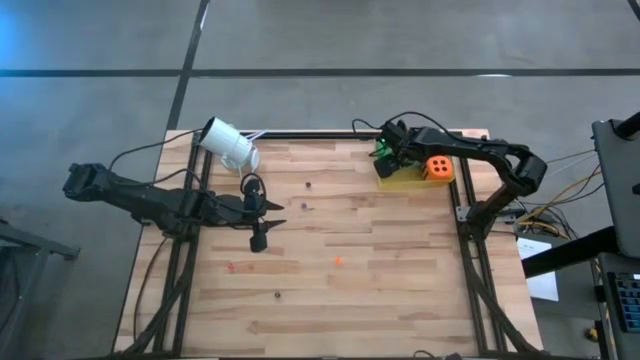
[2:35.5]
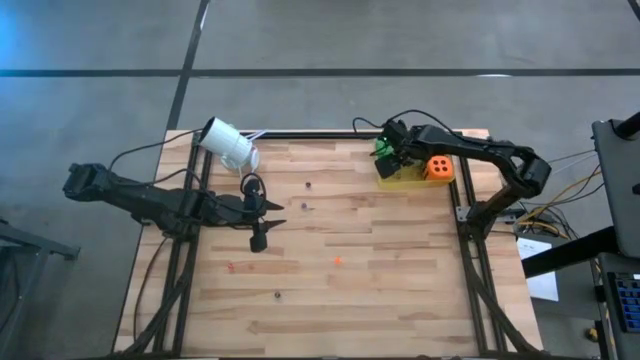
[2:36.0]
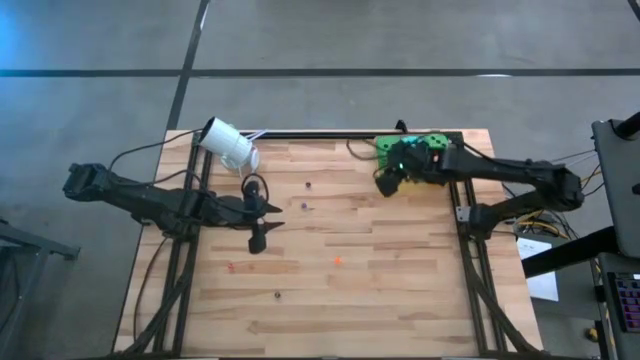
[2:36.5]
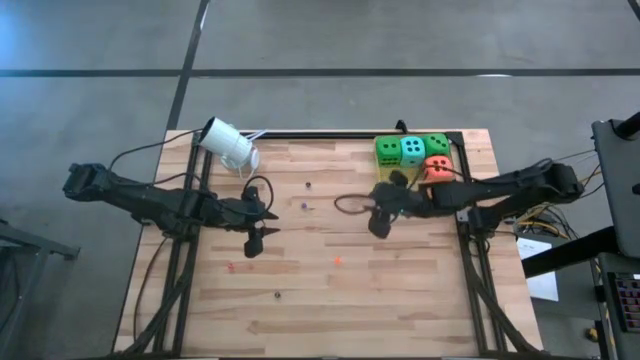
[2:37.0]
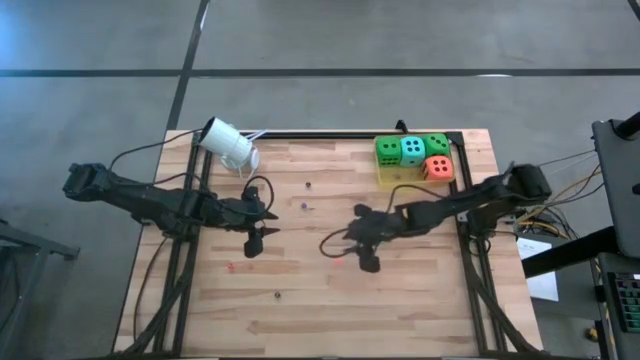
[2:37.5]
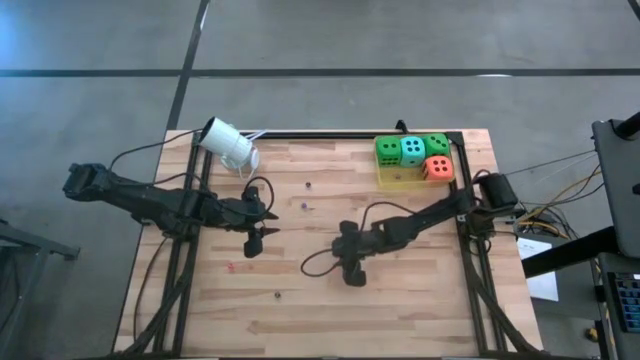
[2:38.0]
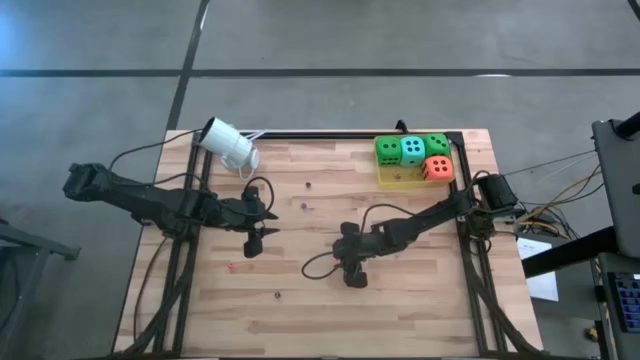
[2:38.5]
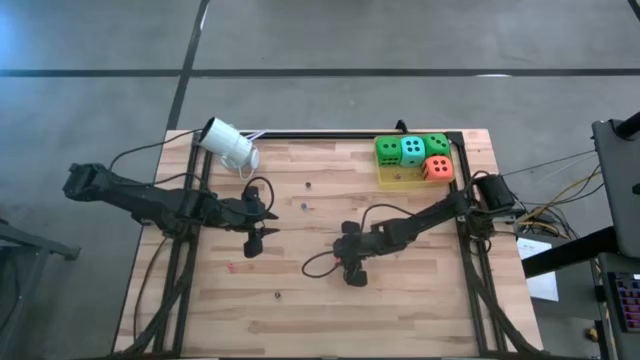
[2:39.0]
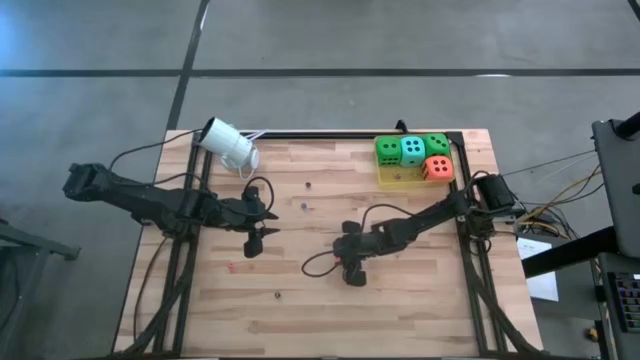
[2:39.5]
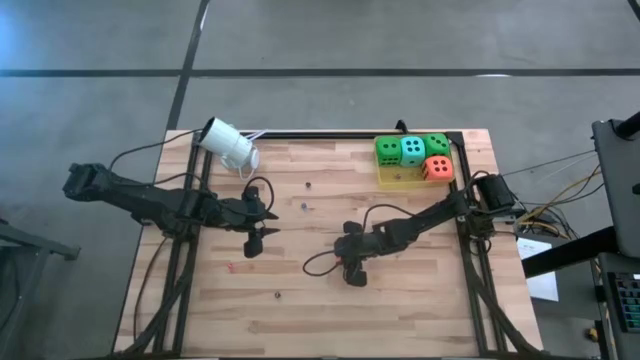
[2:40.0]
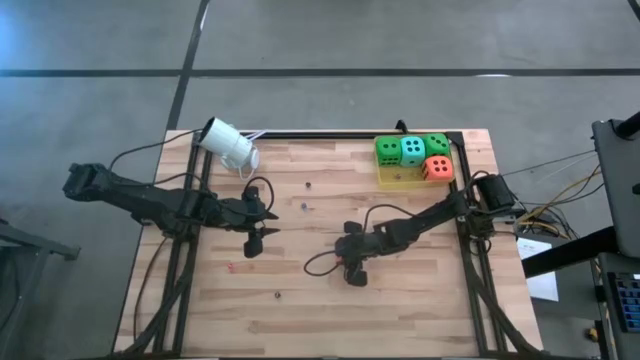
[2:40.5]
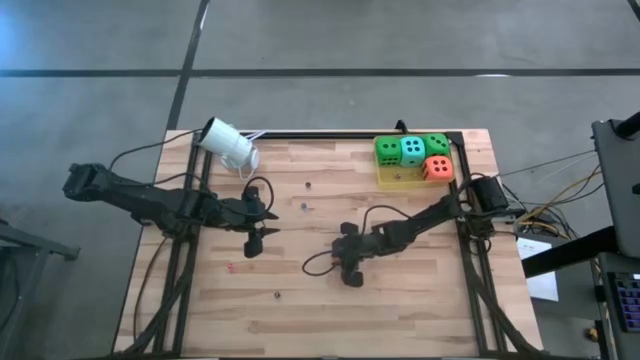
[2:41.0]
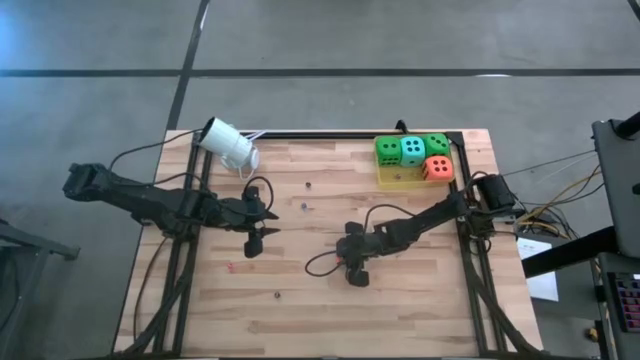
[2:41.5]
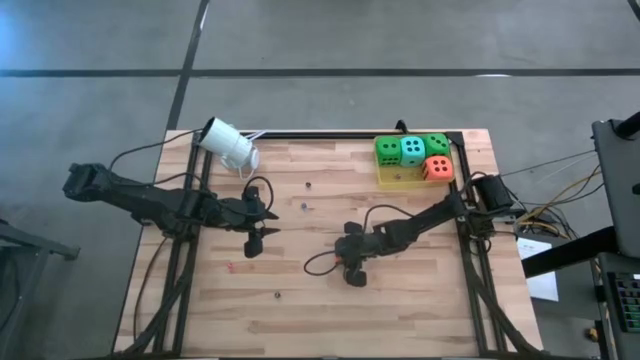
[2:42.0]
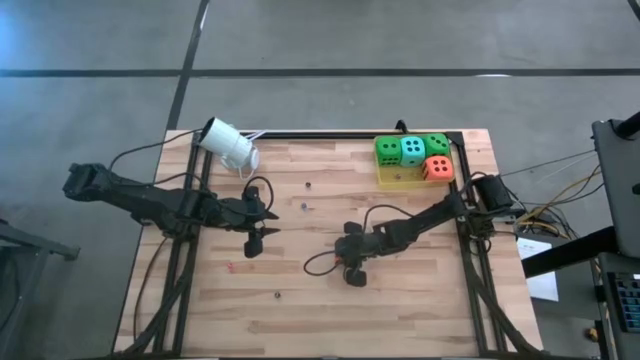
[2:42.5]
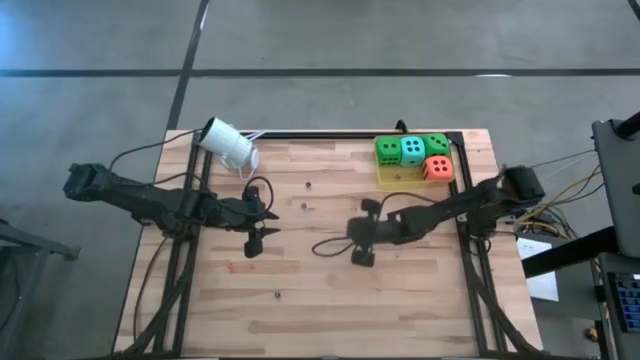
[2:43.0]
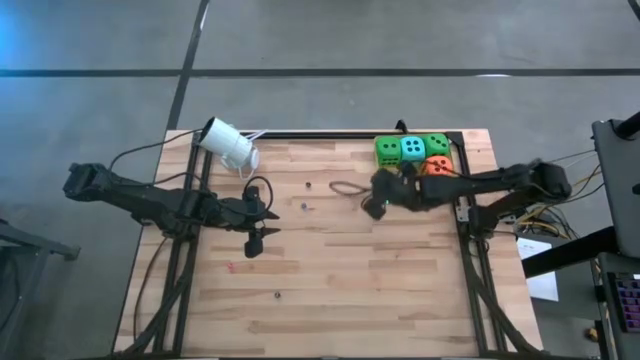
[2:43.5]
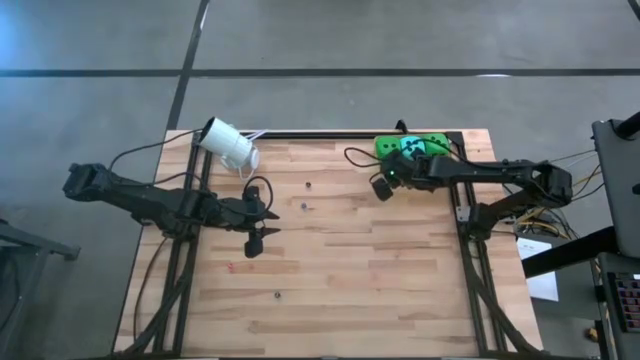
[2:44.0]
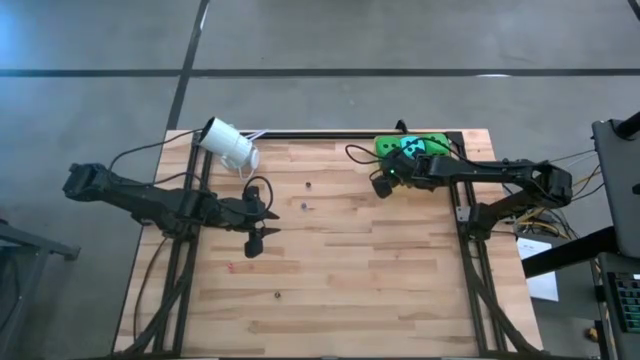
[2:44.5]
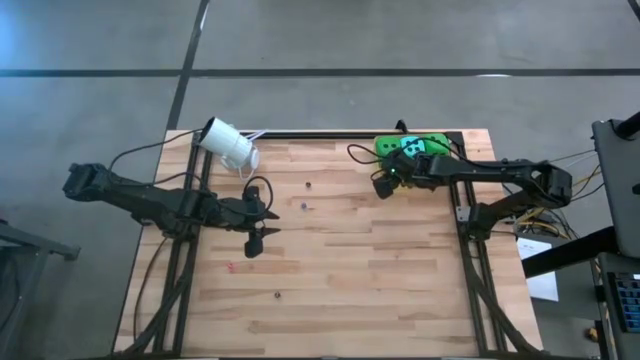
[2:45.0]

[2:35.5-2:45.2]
Task: Pick & Place Dice
Put the small orange dice into the yellow bin

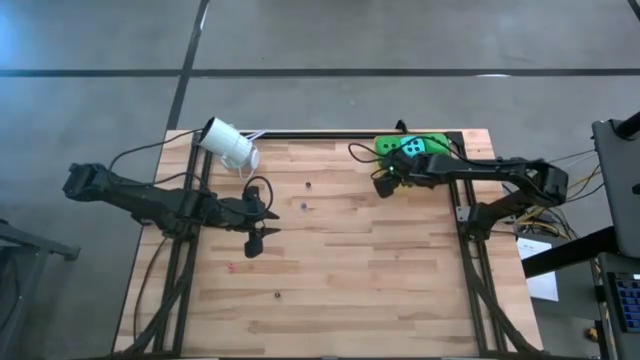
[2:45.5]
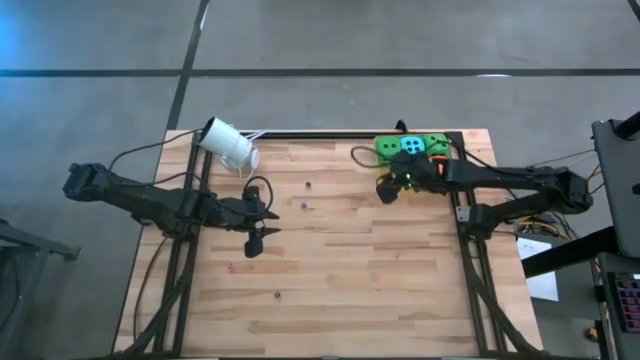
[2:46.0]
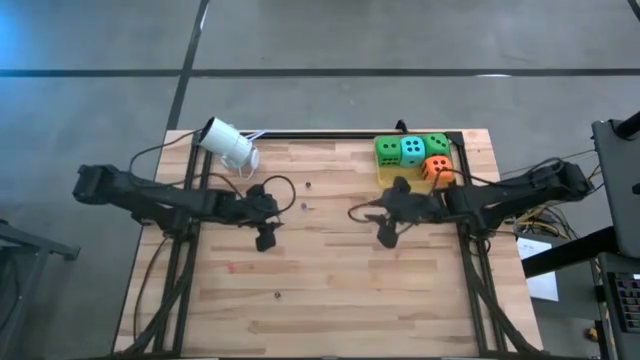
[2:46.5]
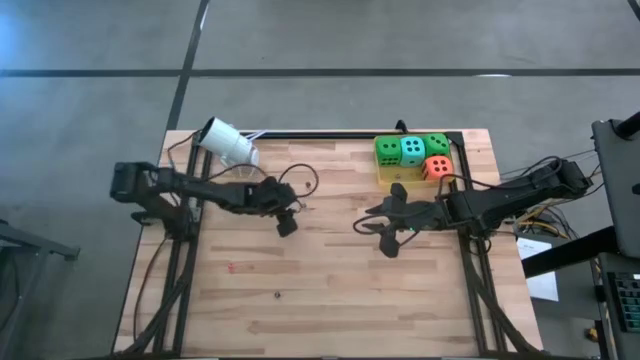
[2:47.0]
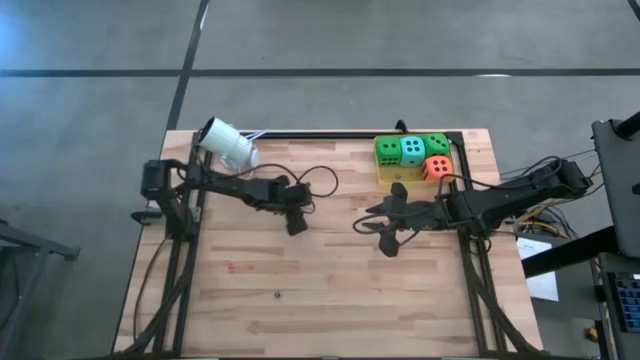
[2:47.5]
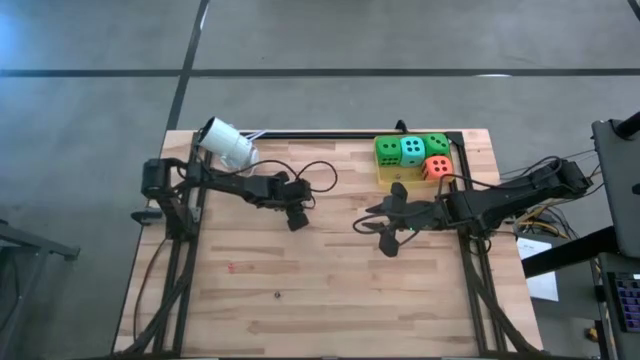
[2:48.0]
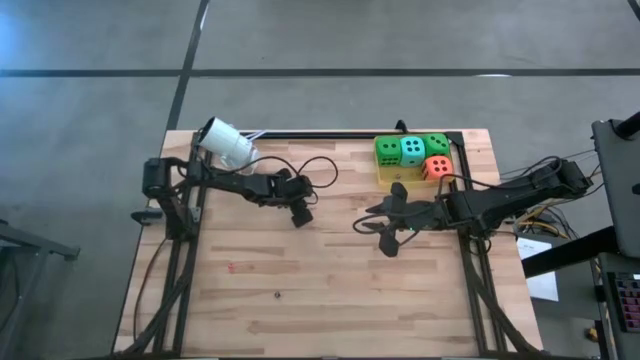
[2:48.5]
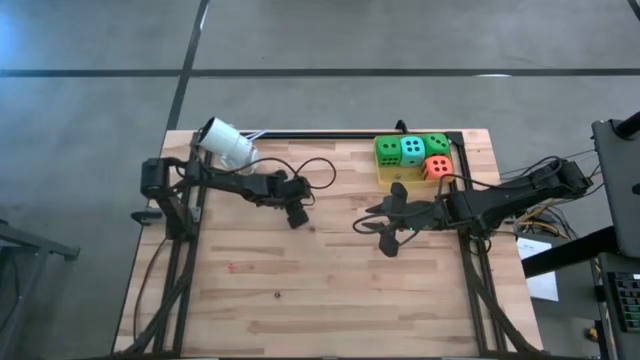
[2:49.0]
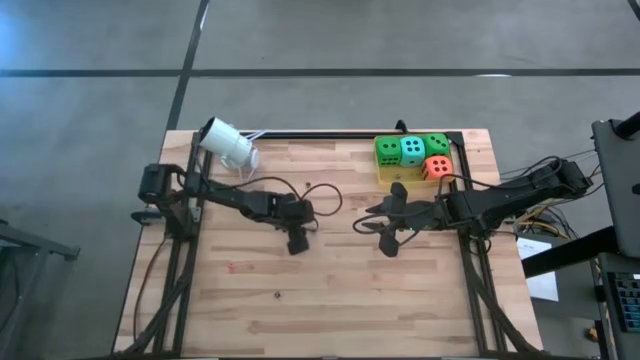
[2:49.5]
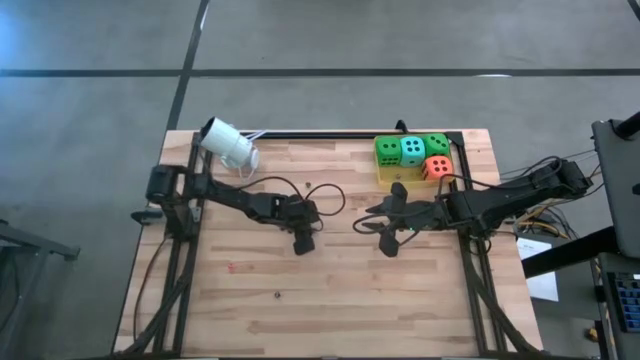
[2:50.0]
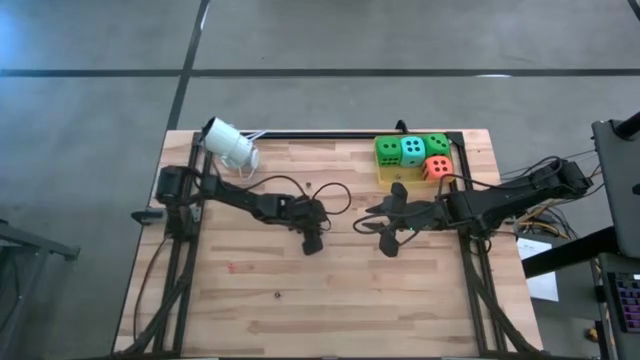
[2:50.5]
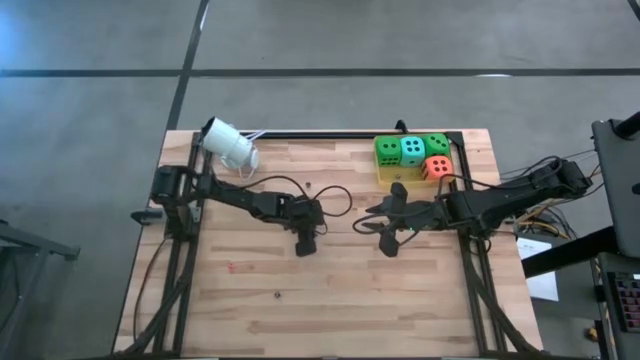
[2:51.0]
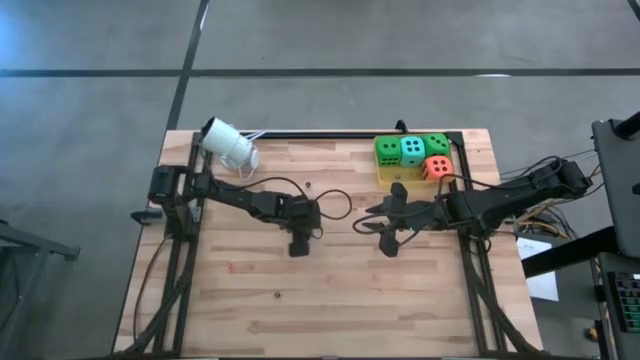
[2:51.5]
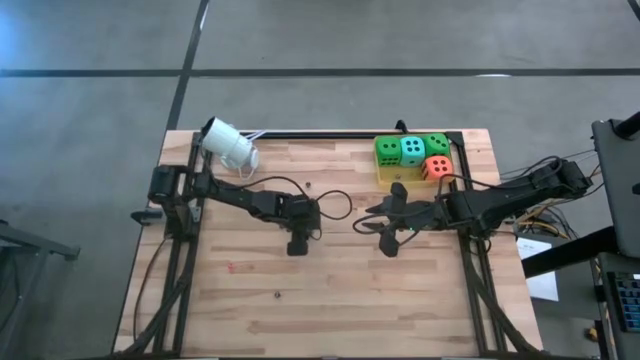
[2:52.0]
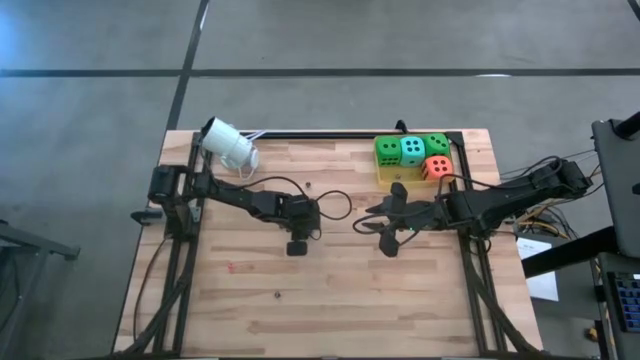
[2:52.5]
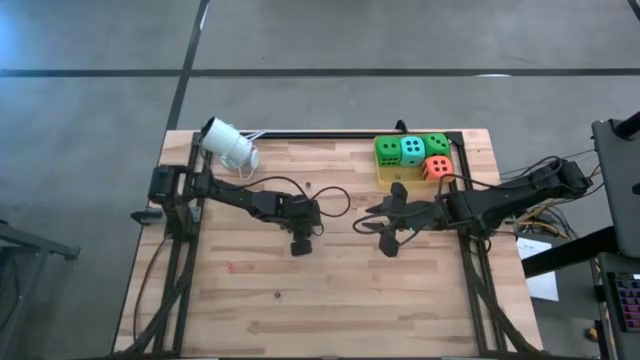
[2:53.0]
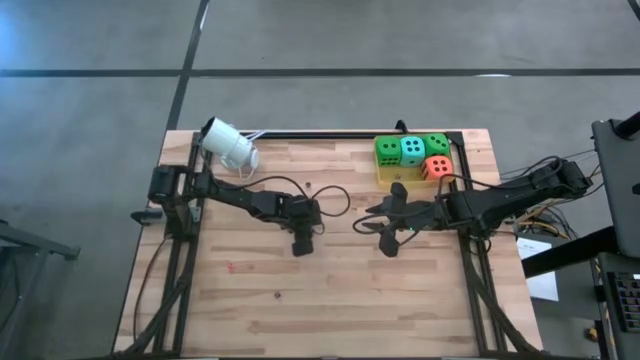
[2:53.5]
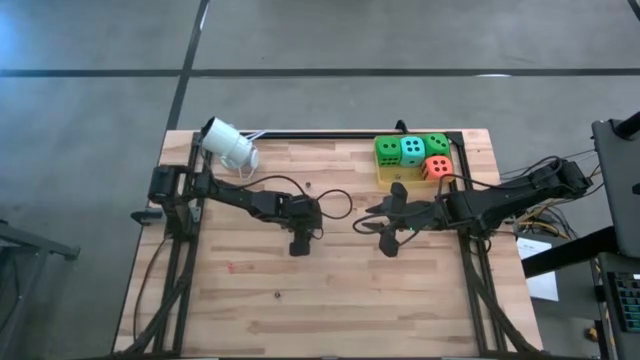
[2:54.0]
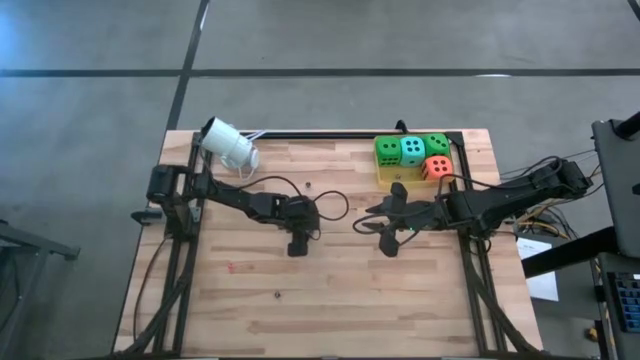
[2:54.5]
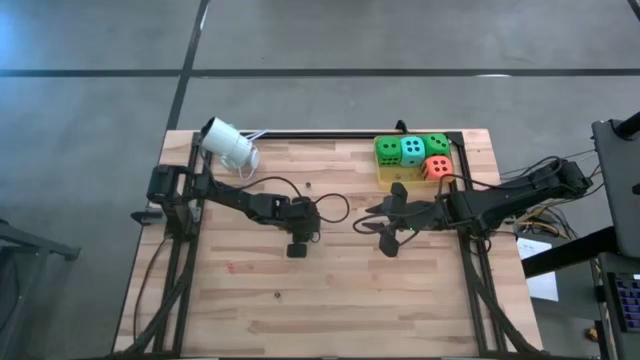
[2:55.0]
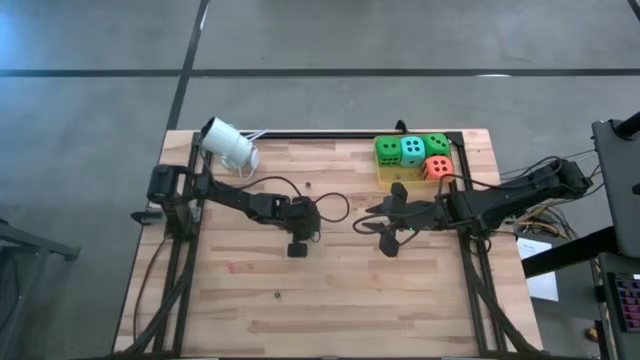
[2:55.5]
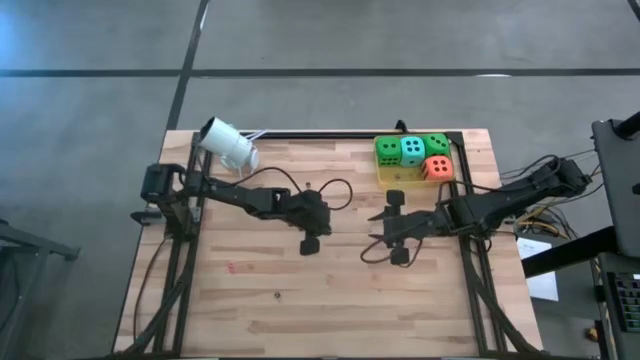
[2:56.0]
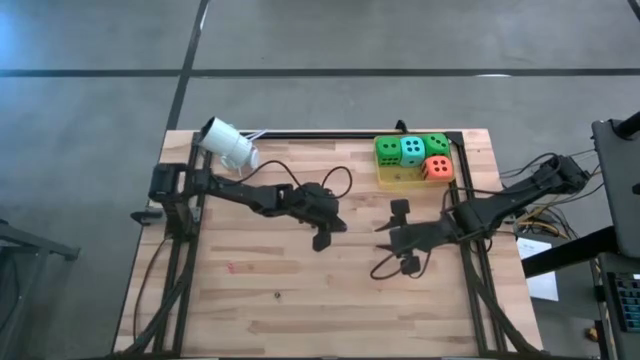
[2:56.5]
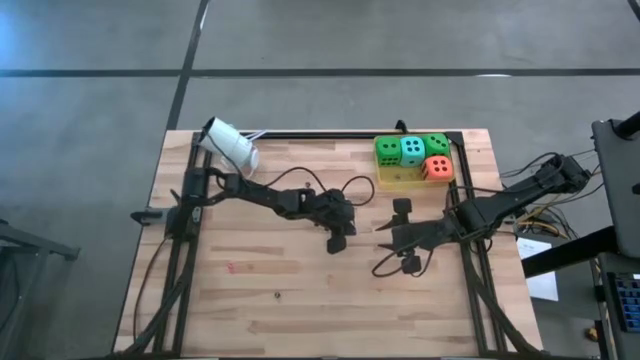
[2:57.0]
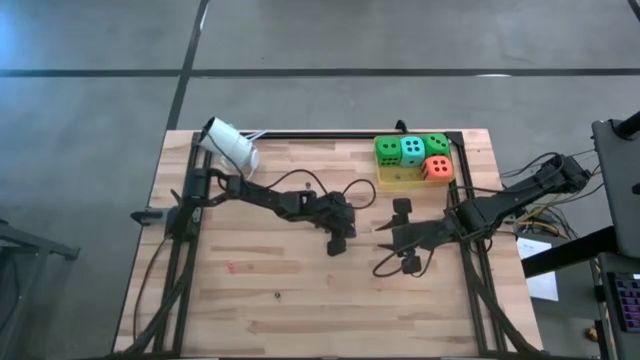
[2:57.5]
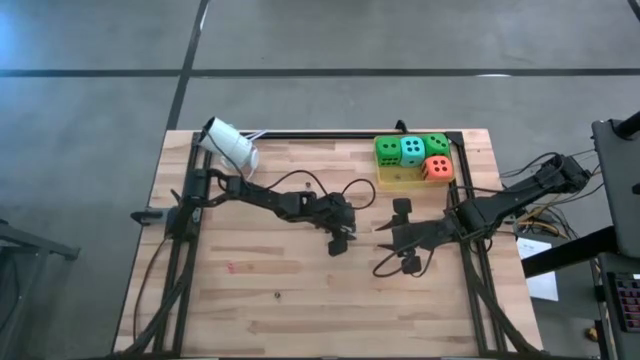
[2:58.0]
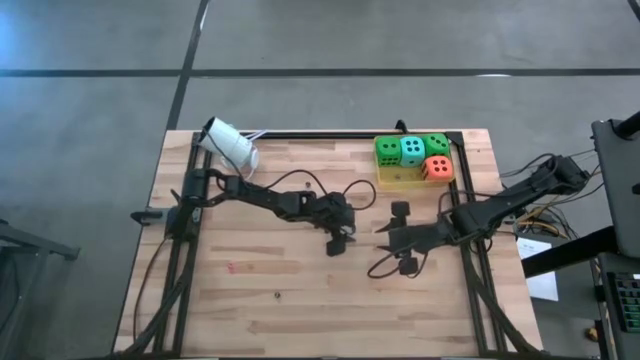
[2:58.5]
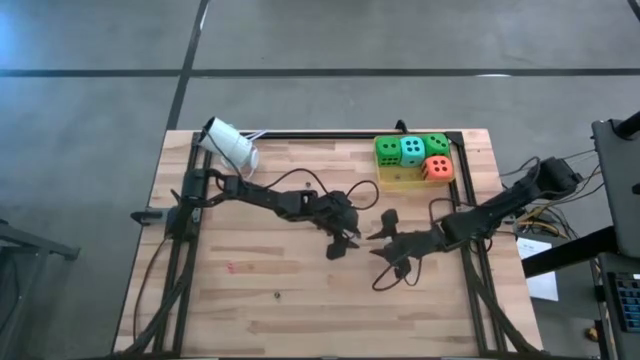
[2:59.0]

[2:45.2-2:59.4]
Put the small blue dice into the yellow bin
